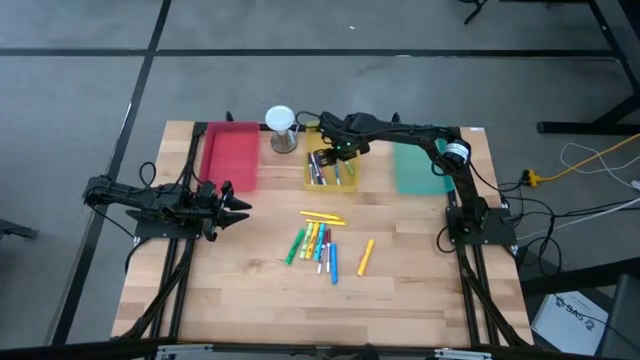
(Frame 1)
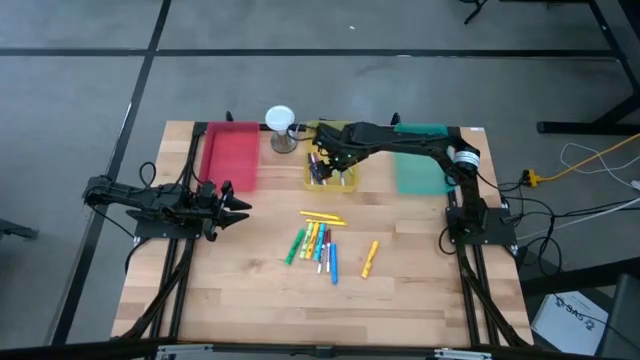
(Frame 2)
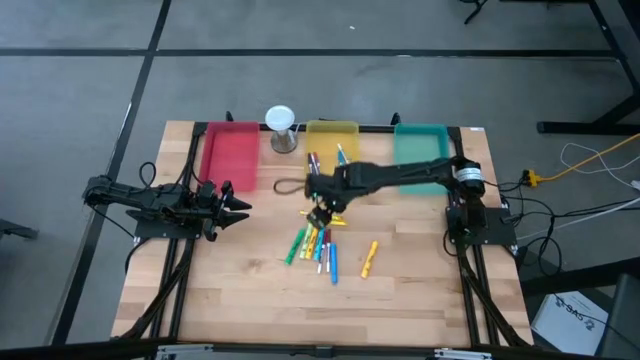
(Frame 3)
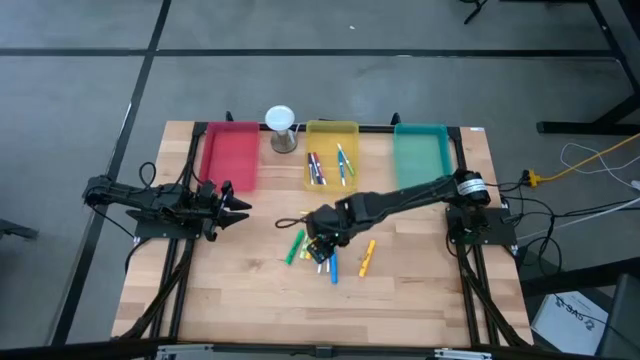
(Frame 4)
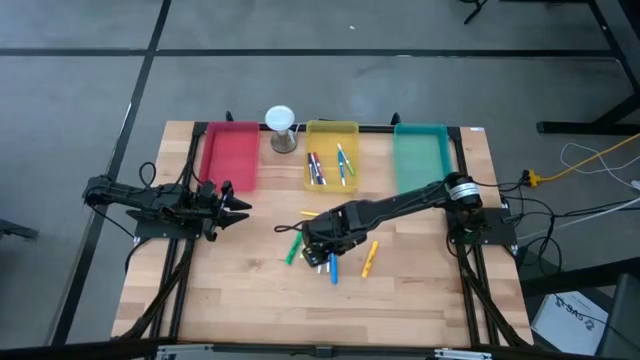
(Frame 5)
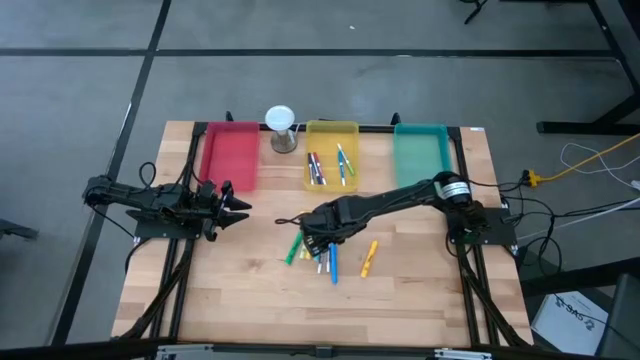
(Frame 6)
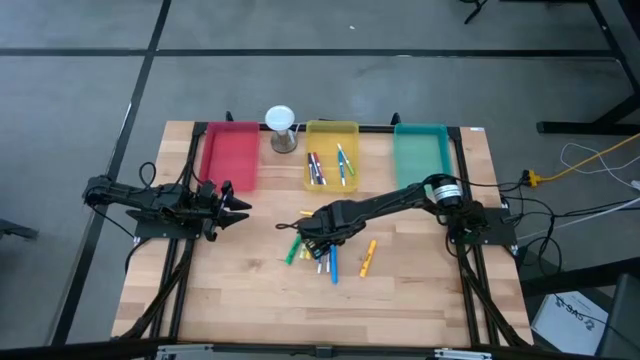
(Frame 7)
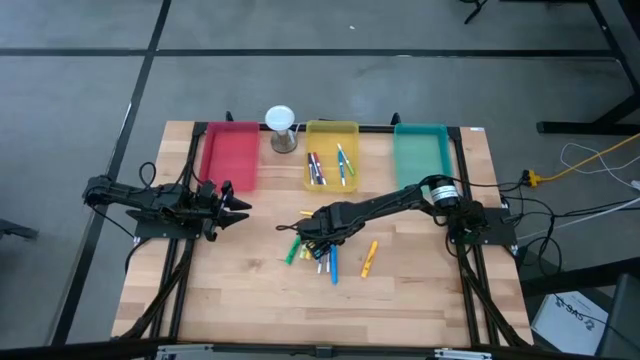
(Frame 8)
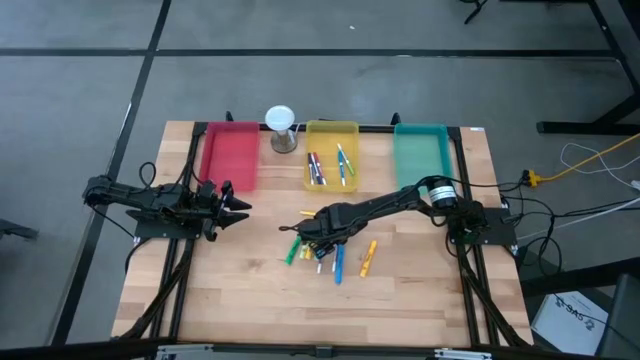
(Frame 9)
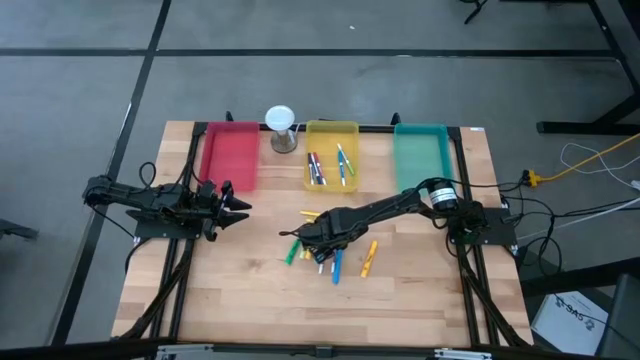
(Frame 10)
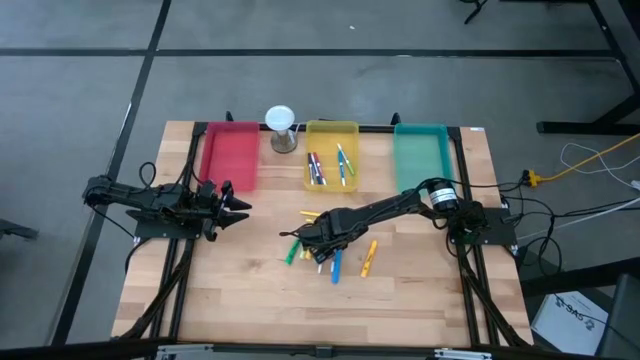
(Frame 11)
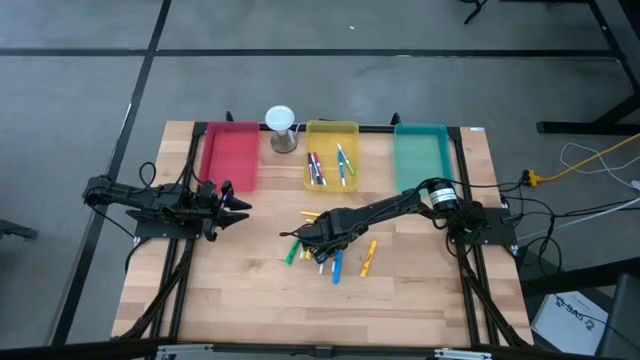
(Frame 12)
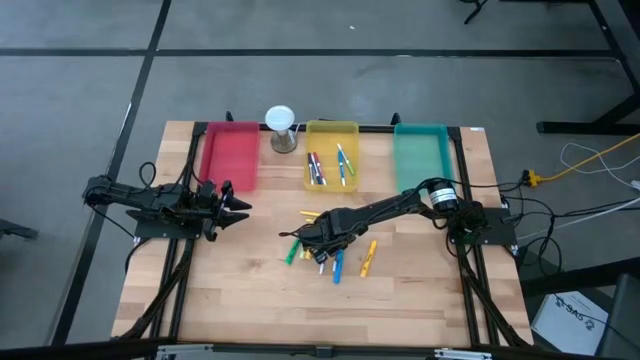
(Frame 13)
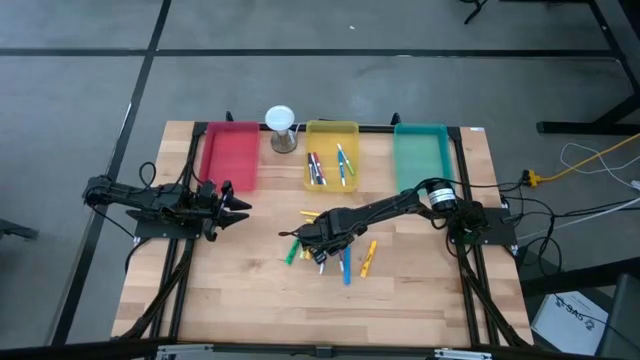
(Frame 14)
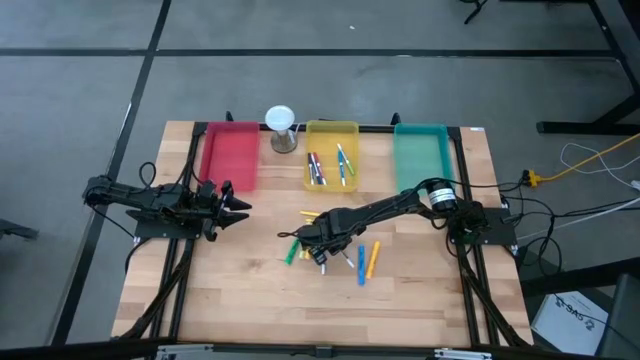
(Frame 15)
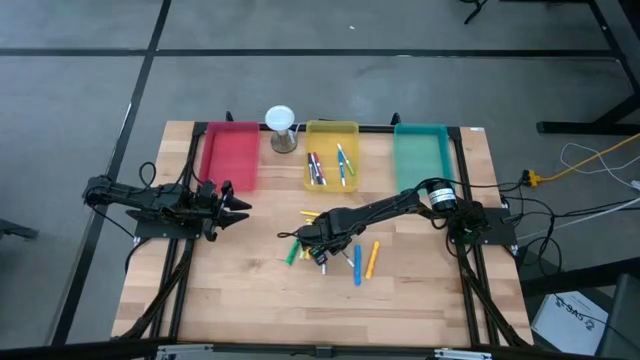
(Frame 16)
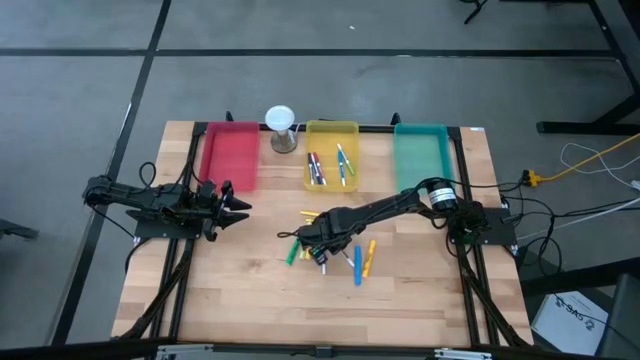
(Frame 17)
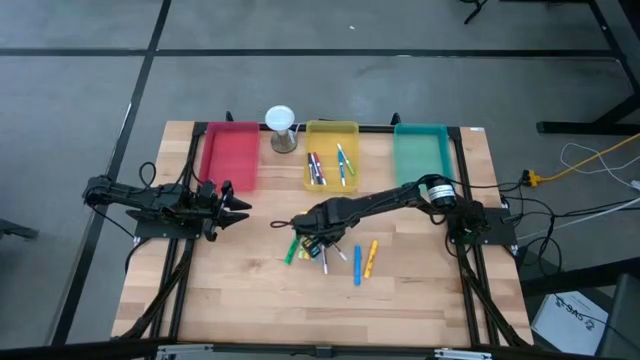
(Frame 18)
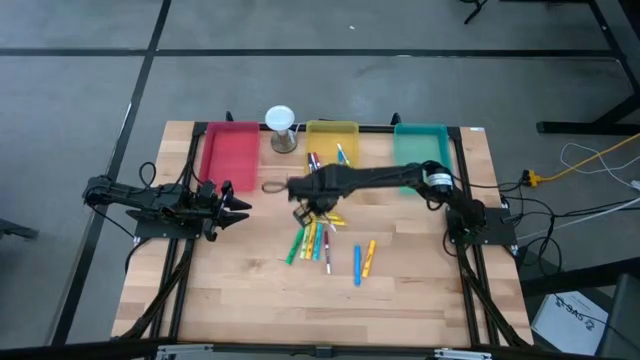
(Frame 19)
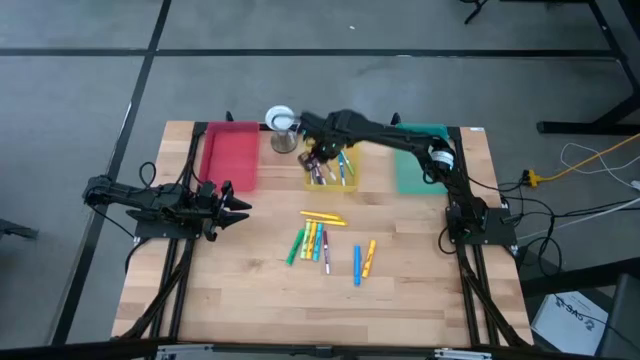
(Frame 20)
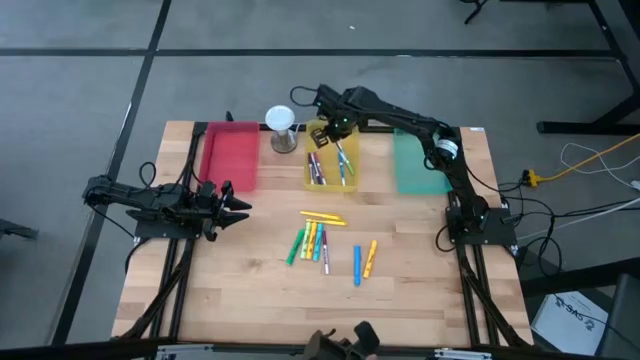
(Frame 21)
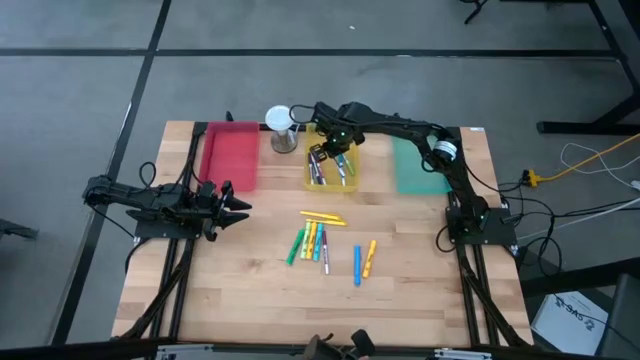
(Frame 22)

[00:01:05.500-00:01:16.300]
Task: Pick & Place Markers
Put the brown marker into the yellow bin

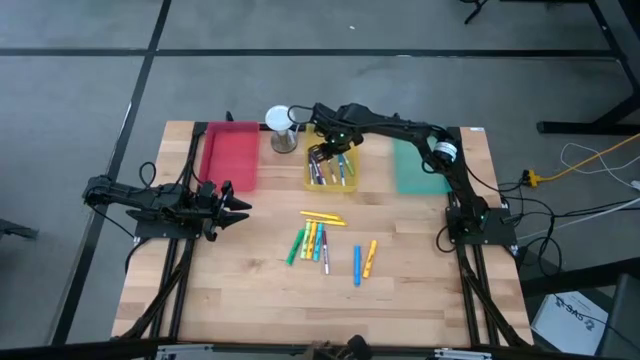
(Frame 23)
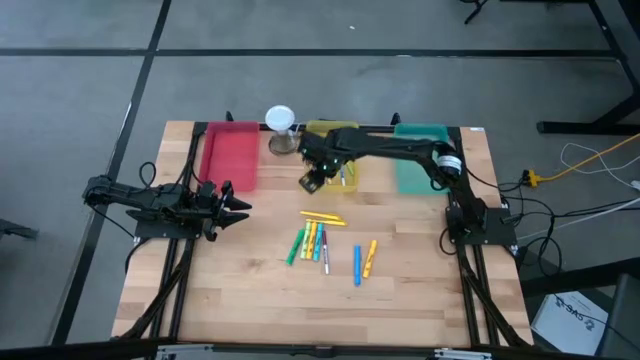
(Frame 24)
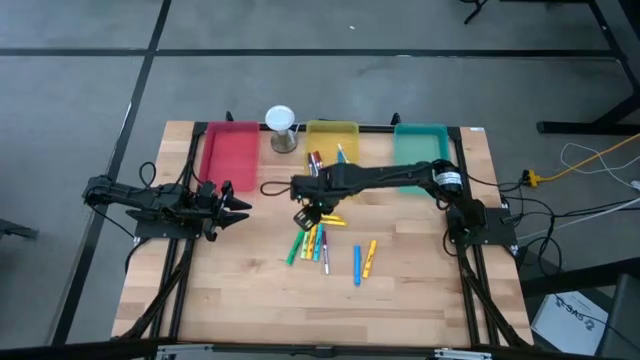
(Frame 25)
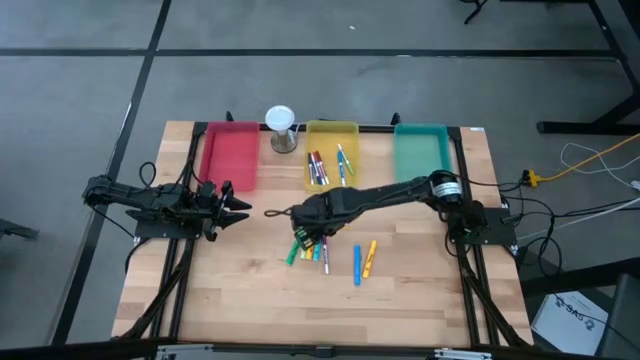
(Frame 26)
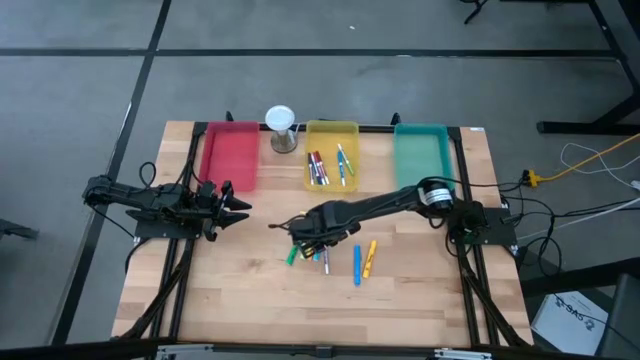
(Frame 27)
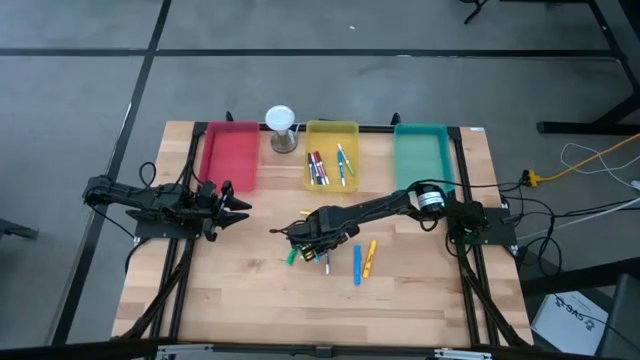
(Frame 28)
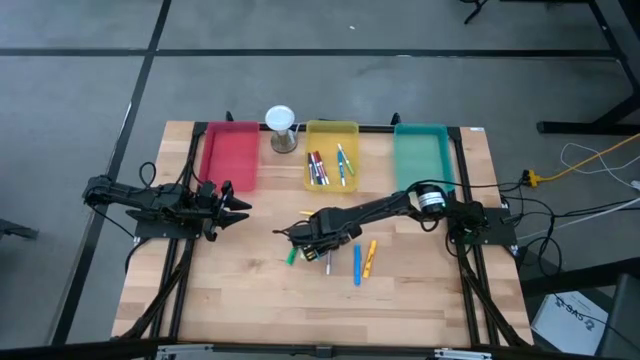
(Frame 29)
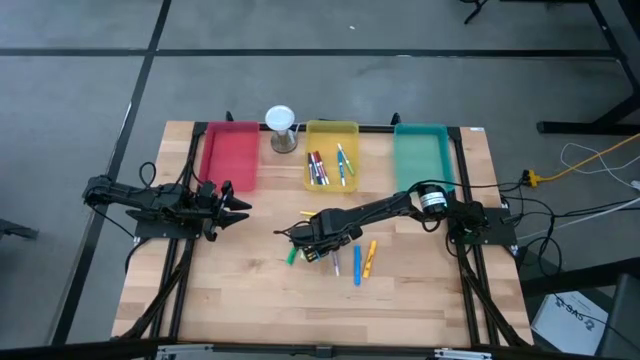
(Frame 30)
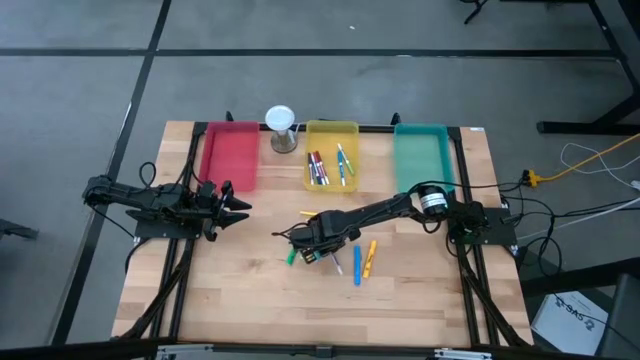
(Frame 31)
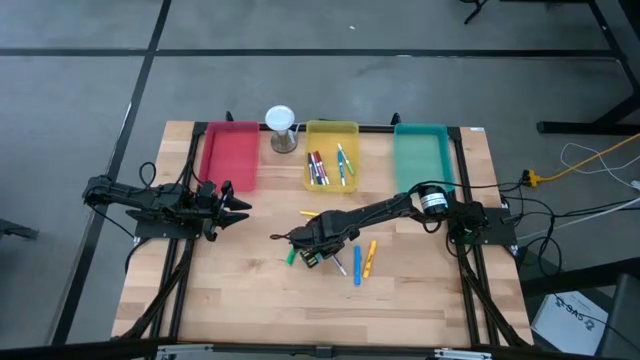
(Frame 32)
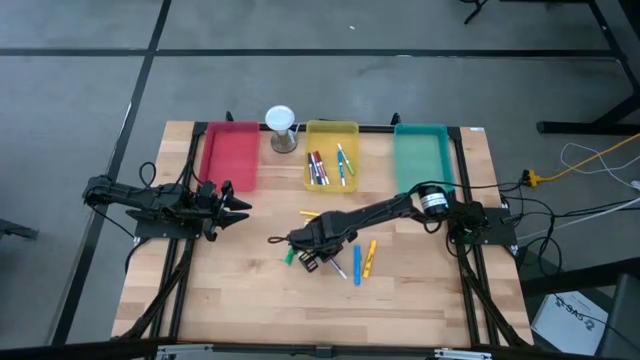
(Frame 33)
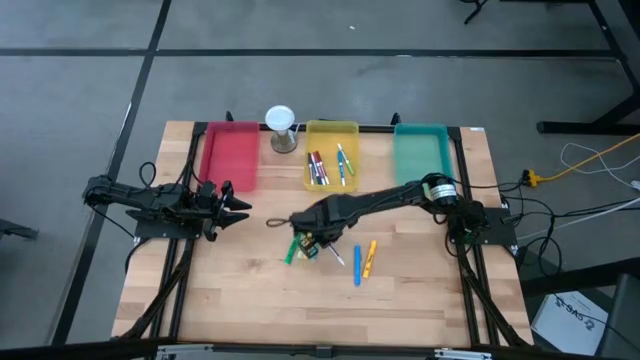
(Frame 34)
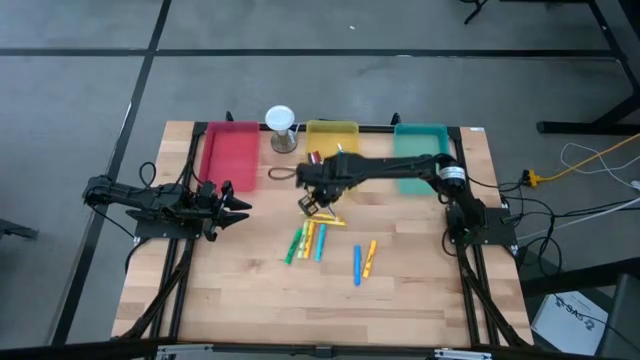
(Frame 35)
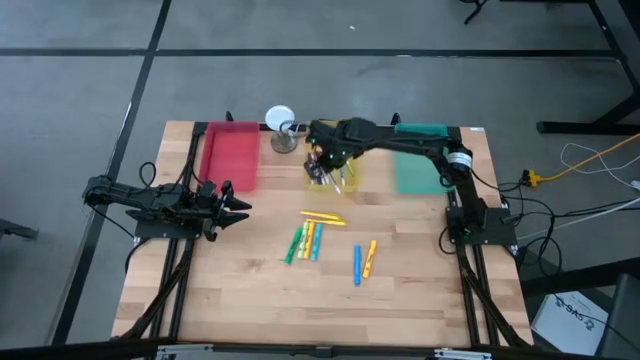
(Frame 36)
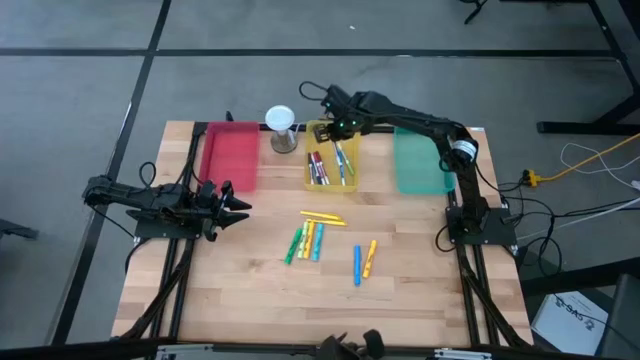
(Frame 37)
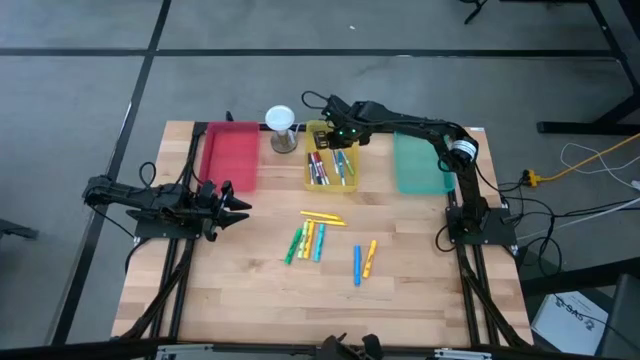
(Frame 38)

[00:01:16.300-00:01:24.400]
Put the red marker into the yellow bin
